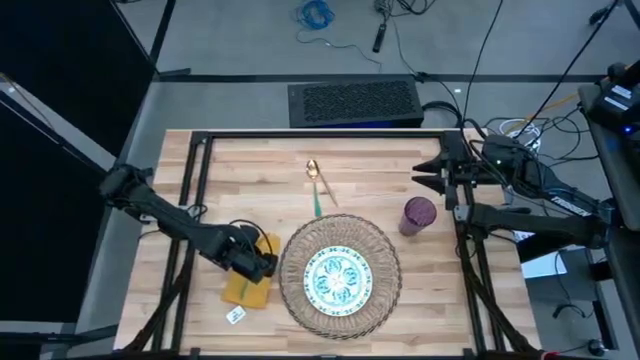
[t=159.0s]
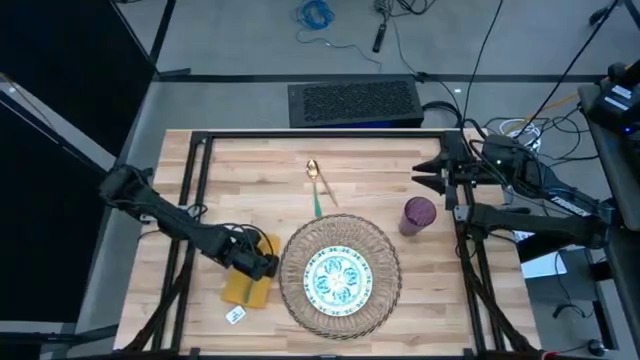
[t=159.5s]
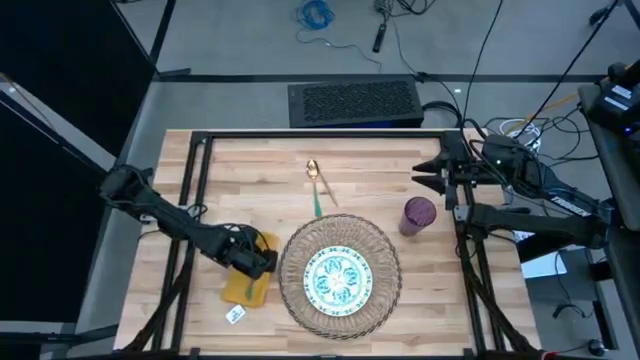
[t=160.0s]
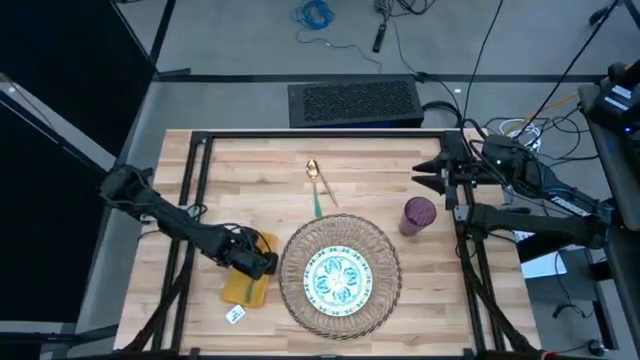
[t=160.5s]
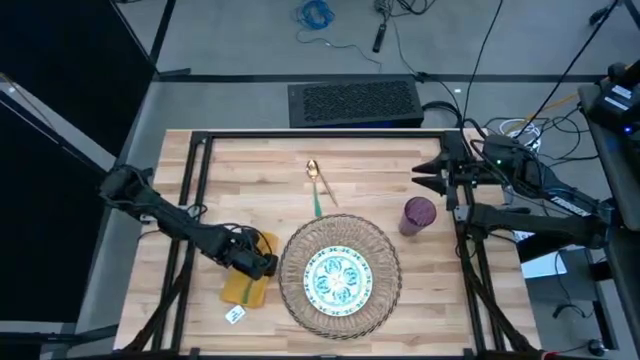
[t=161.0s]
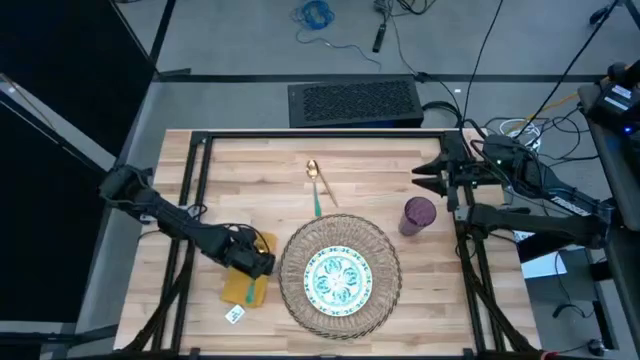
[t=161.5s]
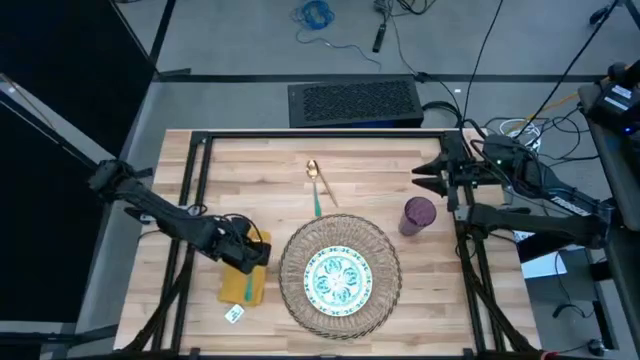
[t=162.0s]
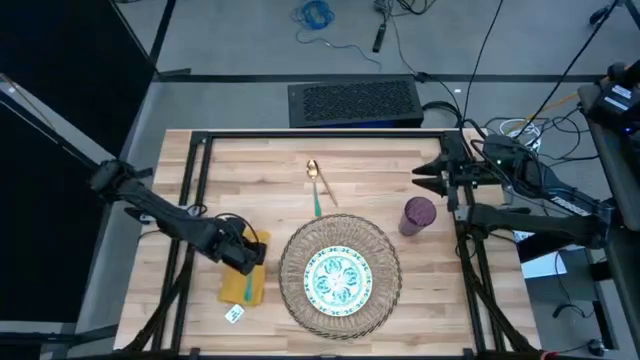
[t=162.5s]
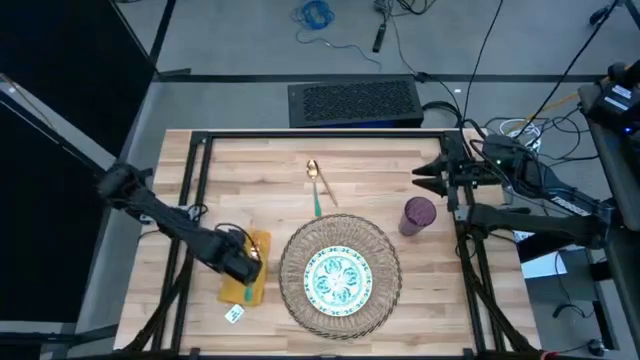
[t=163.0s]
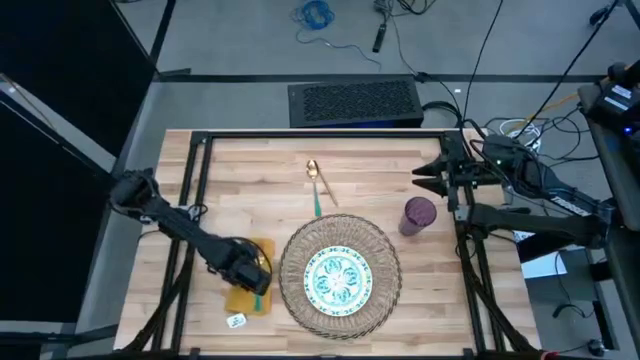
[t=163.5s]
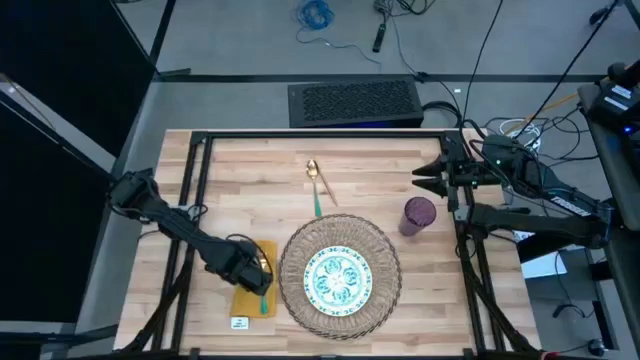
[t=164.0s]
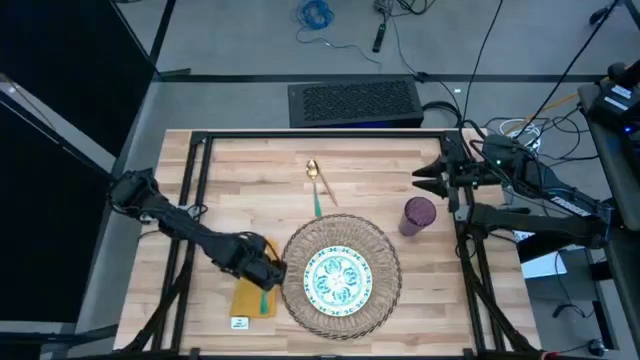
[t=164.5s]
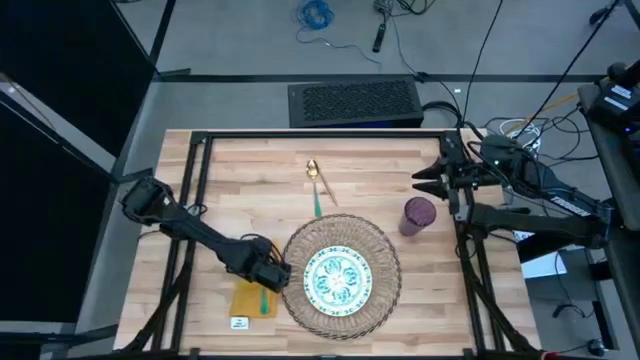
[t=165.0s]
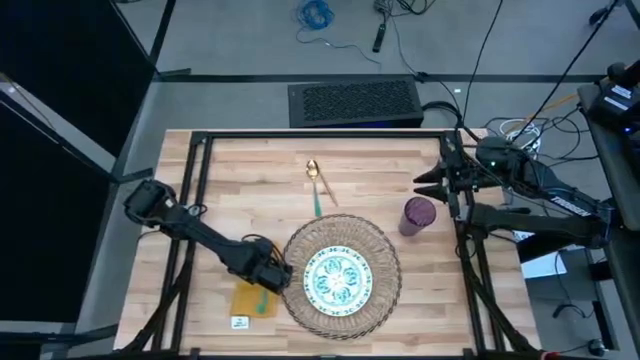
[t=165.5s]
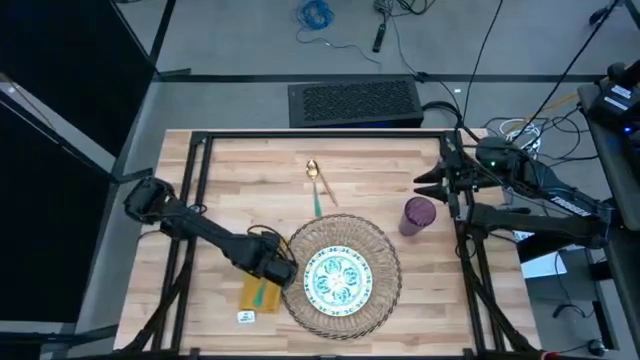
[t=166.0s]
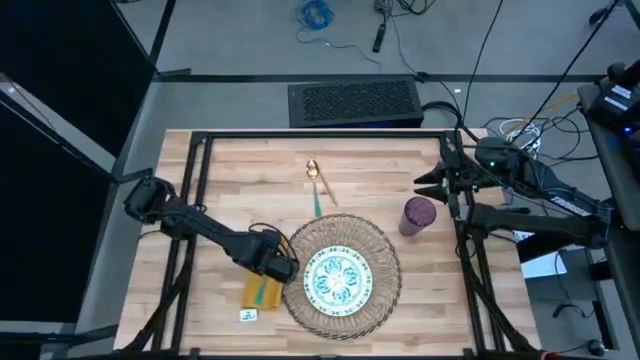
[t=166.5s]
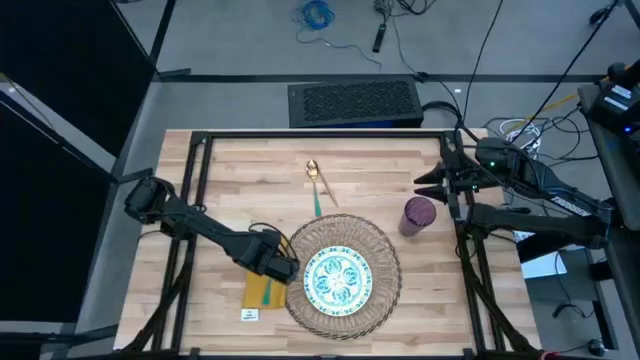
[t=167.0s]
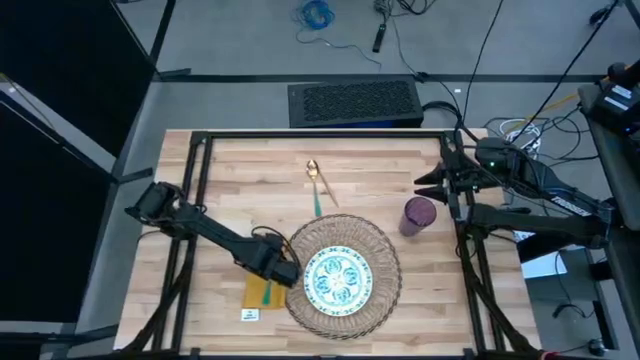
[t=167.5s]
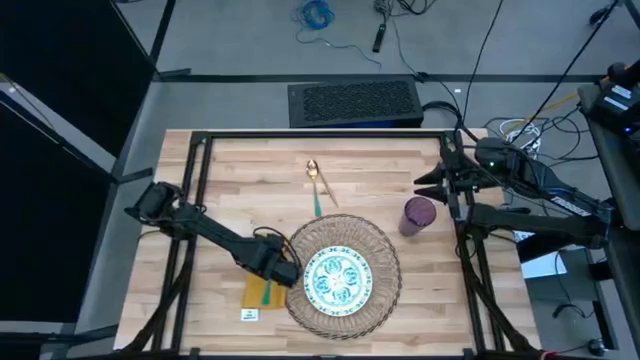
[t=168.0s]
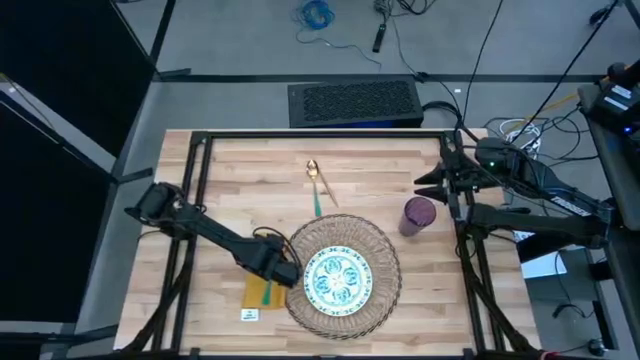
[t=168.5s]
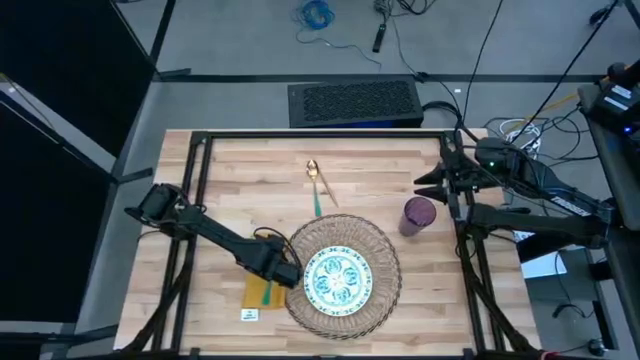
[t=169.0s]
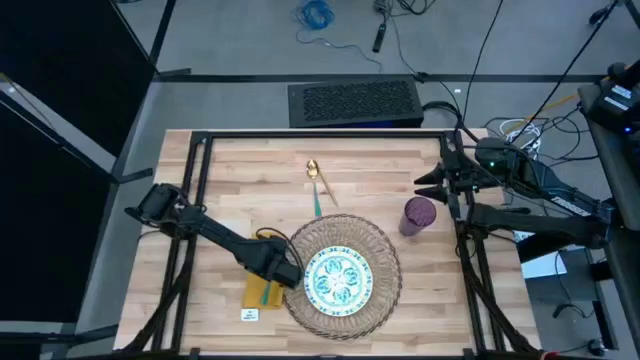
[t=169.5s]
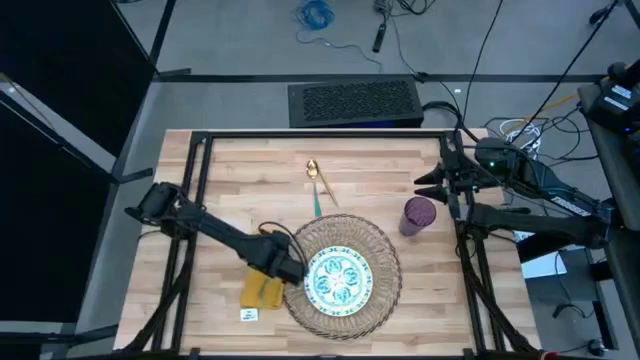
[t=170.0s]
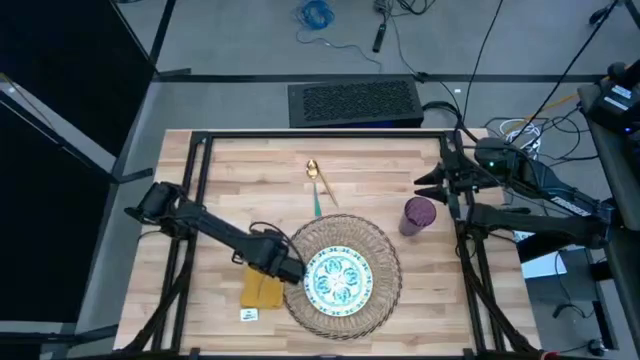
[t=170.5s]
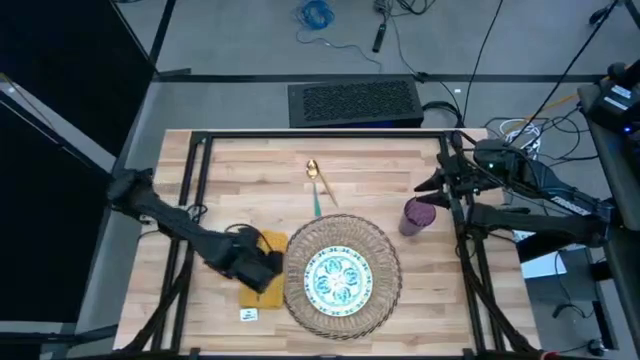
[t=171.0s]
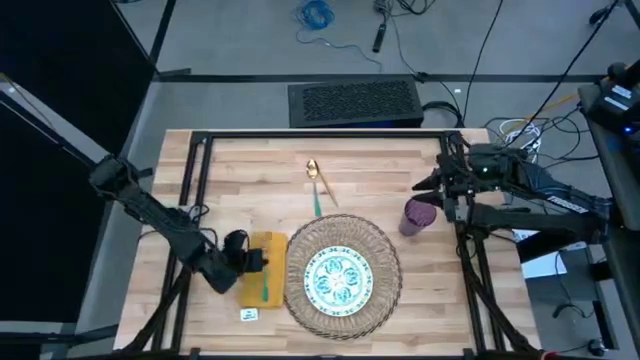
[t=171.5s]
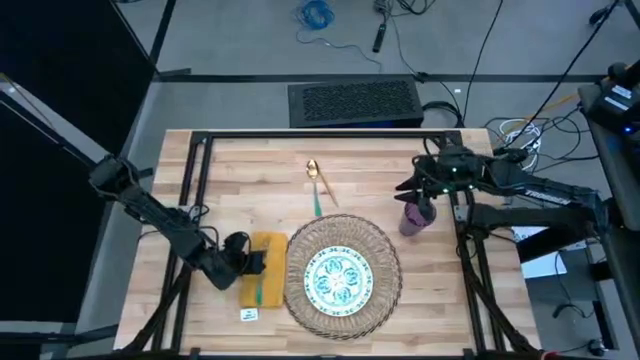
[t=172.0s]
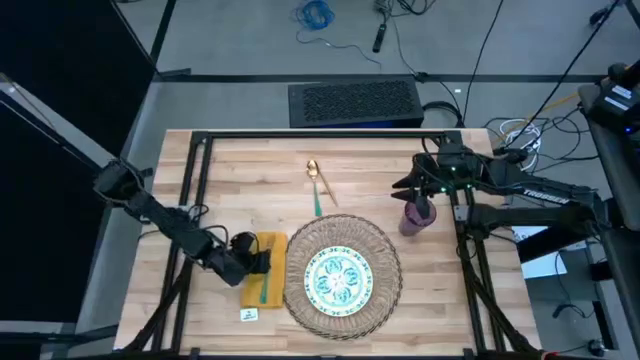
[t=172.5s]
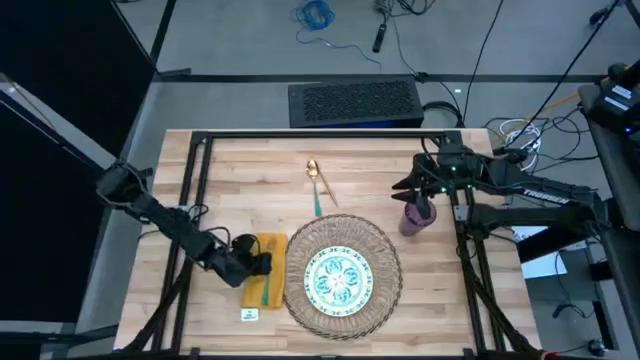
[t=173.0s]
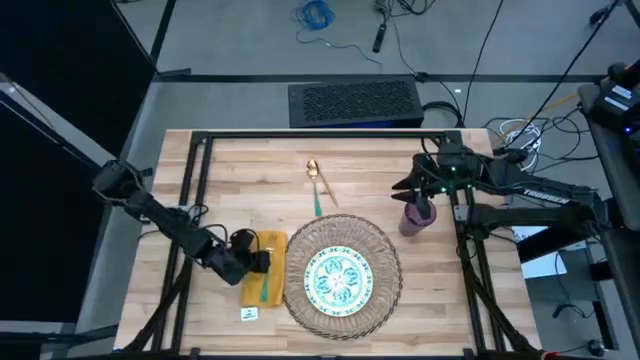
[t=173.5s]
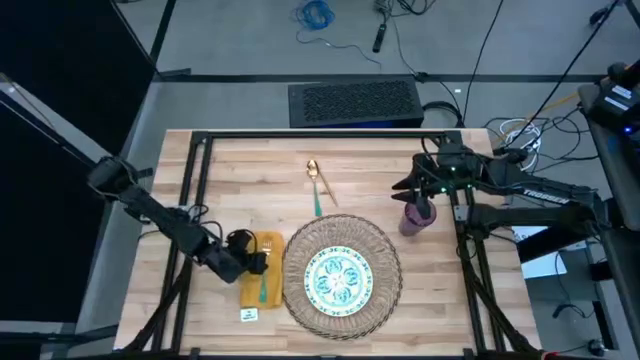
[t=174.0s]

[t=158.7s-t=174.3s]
Task: Set table place
Put the green table fork on top of the folded yellow table napkin

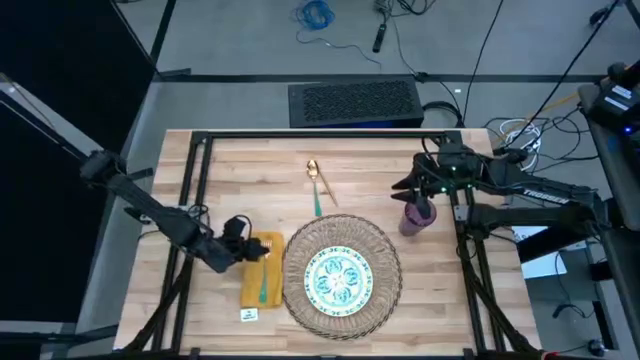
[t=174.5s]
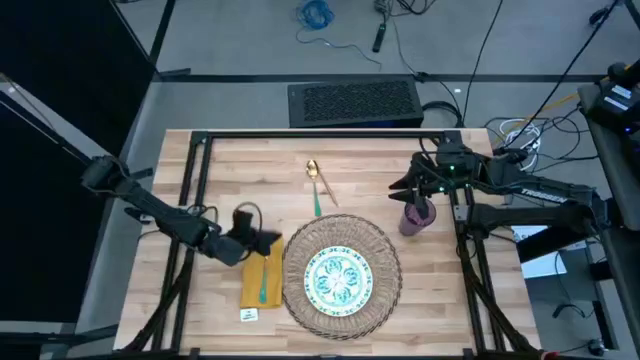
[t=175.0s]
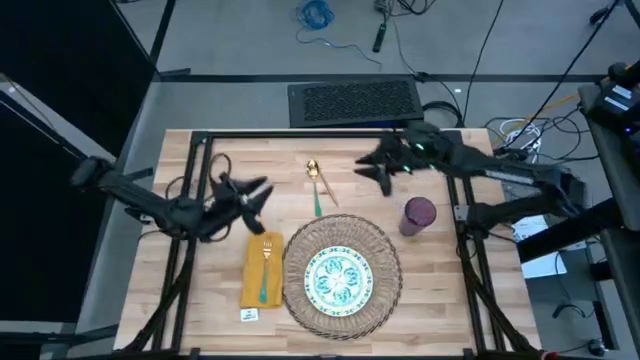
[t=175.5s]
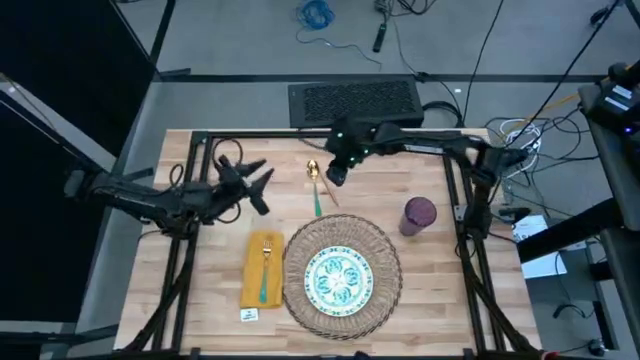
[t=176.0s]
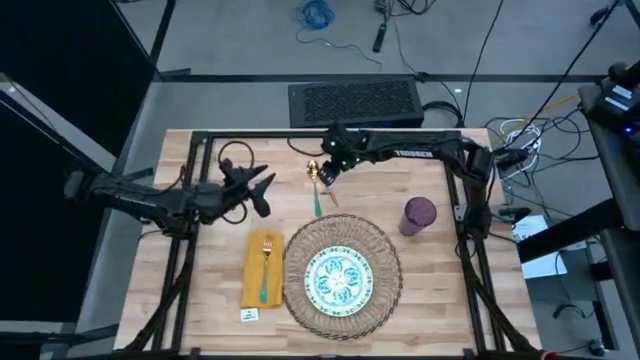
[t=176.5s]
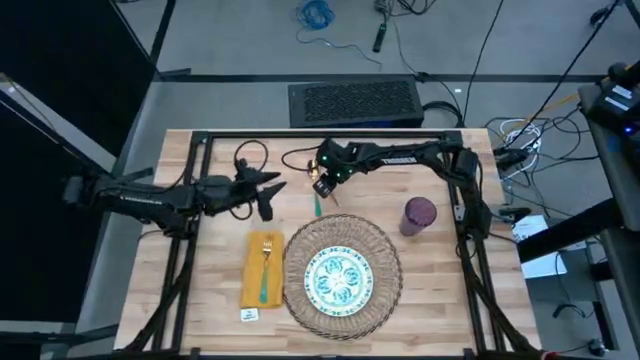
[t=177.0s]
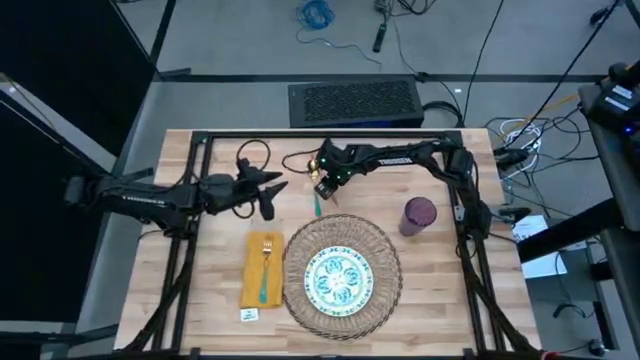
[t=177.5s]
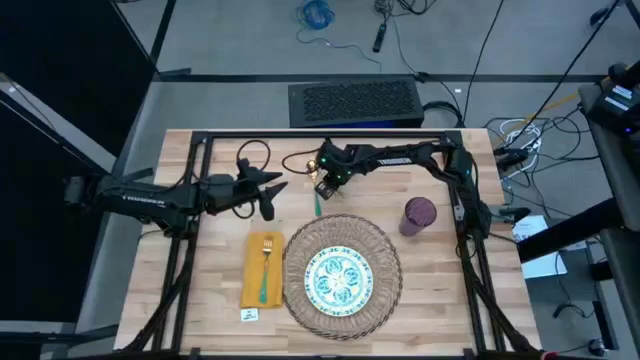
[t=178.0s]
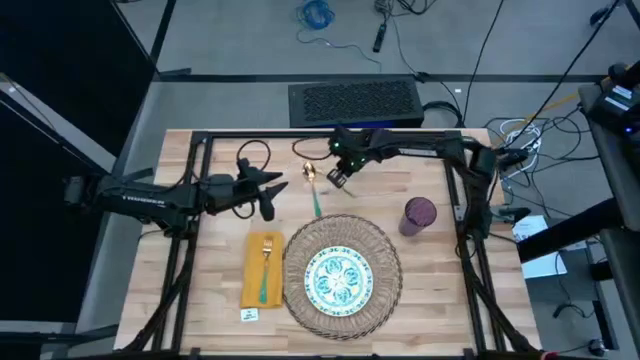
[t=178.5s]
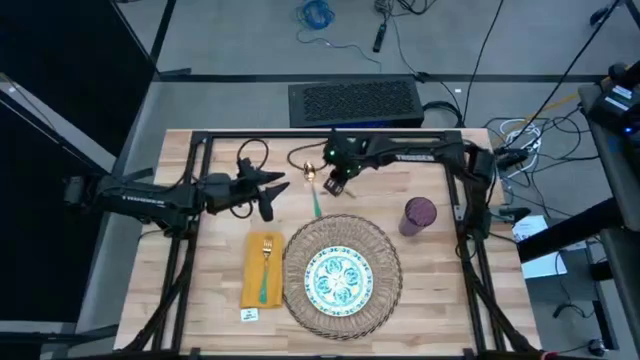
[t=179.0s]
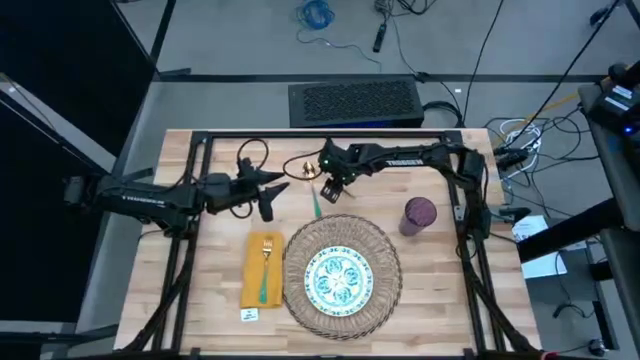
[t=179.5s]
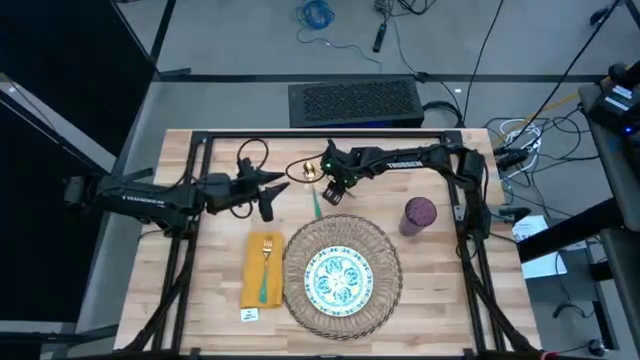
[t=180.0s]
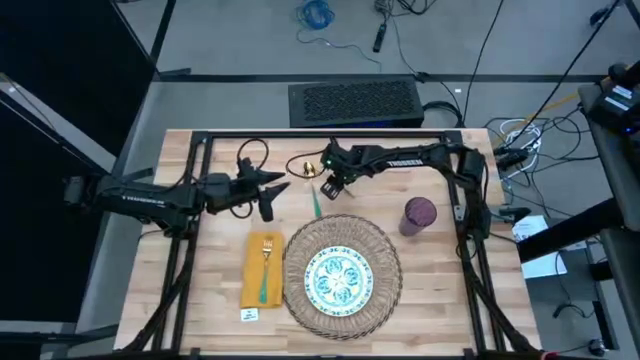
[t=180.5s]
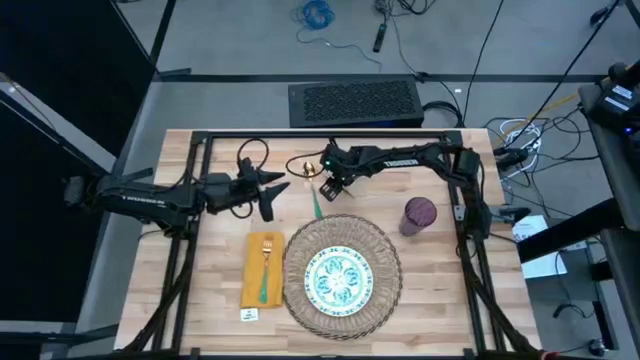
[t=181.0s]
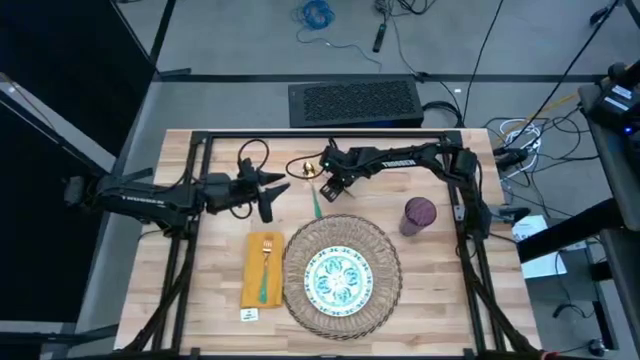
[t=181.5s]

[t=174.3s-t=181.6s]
Put the gold table knife to the right of the white plate on the brown table mat
